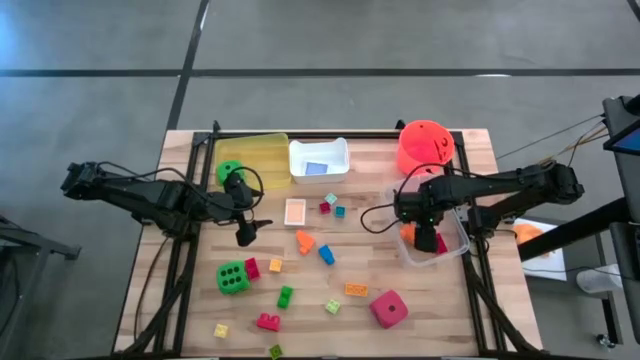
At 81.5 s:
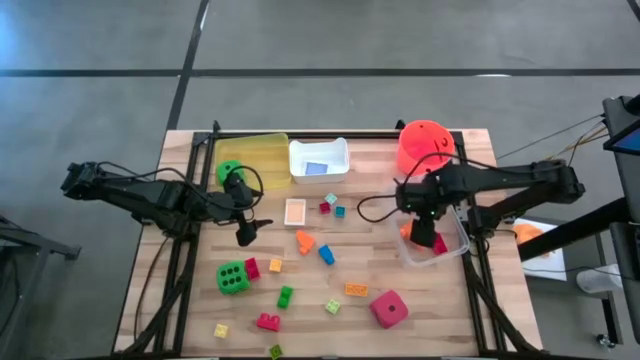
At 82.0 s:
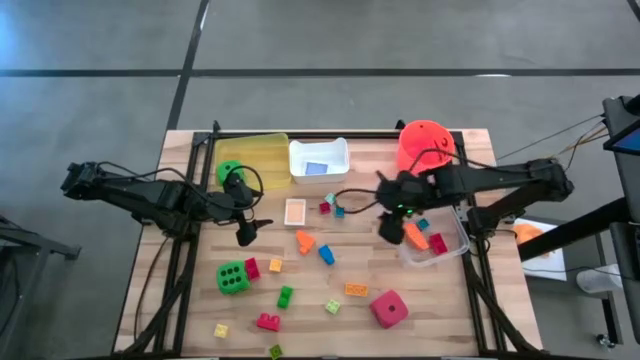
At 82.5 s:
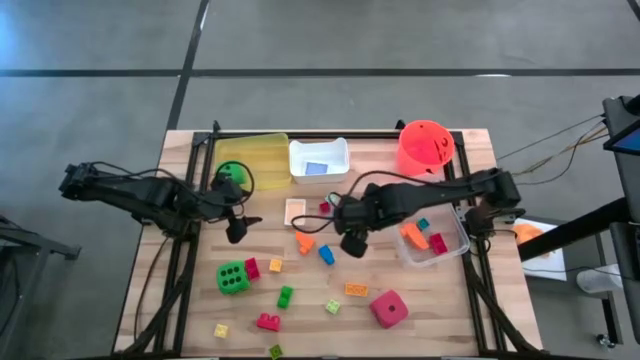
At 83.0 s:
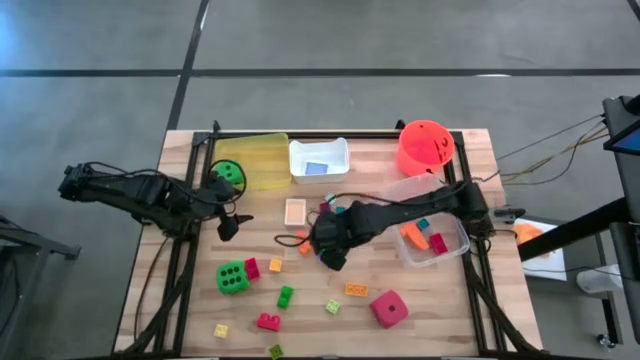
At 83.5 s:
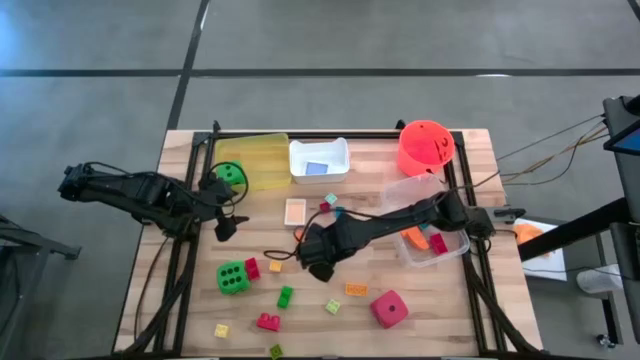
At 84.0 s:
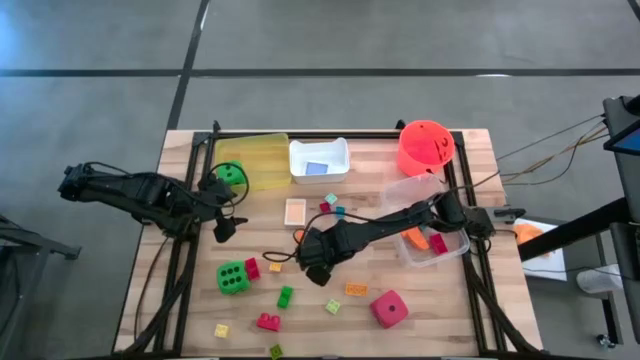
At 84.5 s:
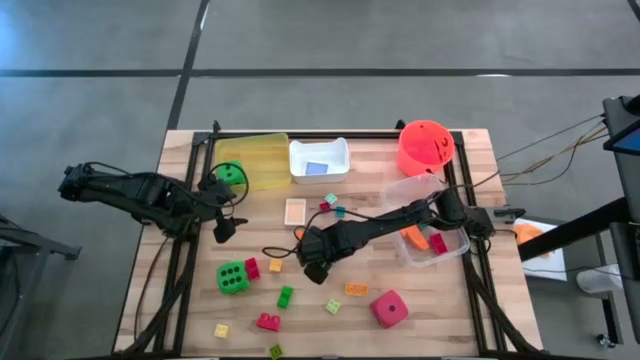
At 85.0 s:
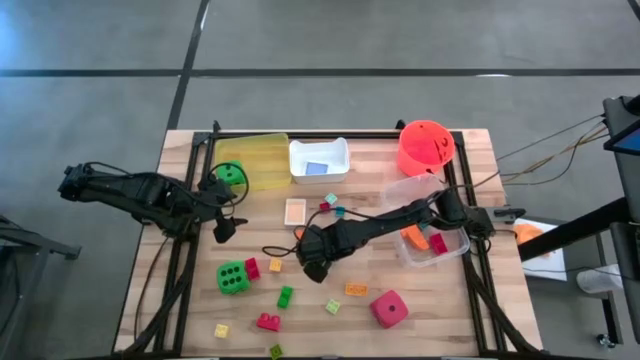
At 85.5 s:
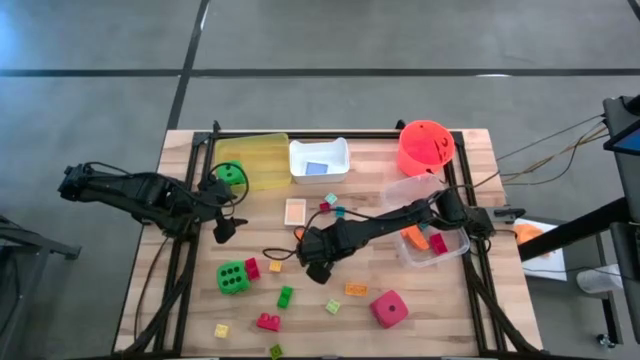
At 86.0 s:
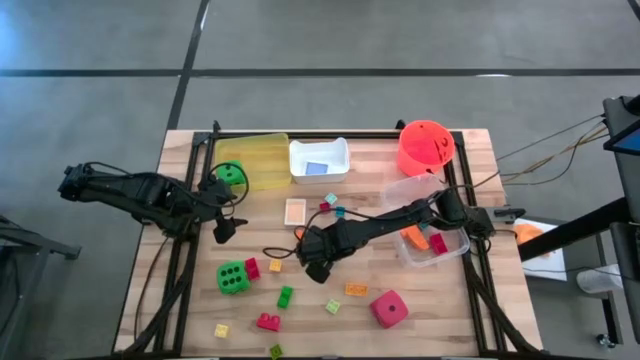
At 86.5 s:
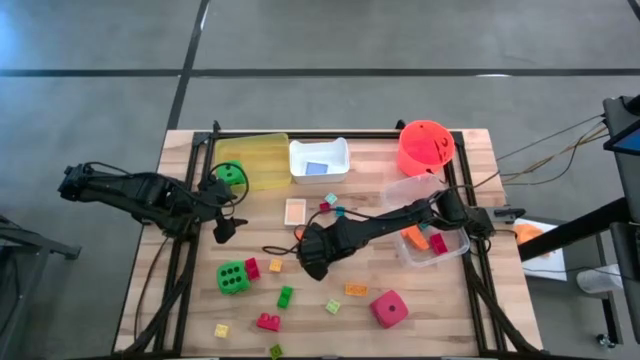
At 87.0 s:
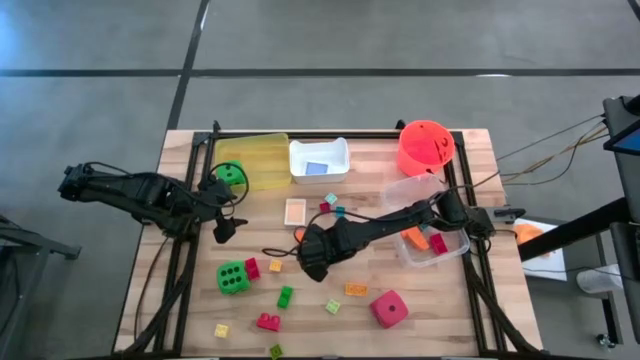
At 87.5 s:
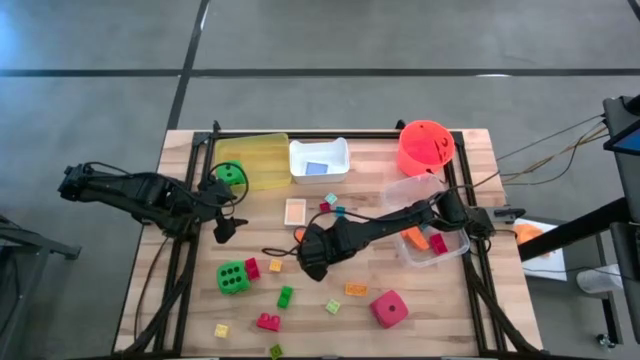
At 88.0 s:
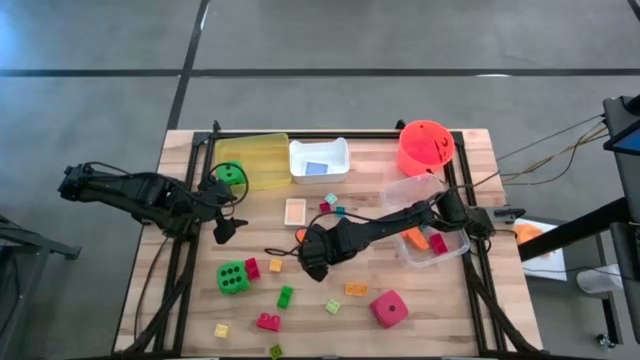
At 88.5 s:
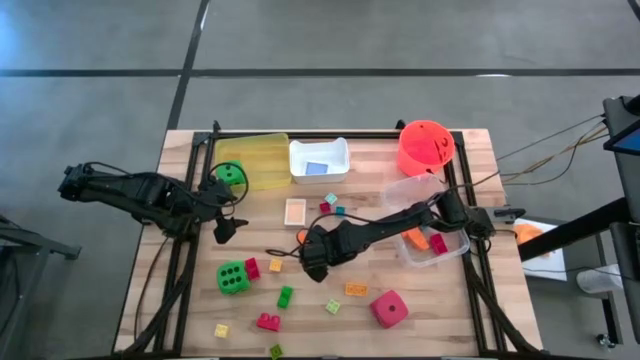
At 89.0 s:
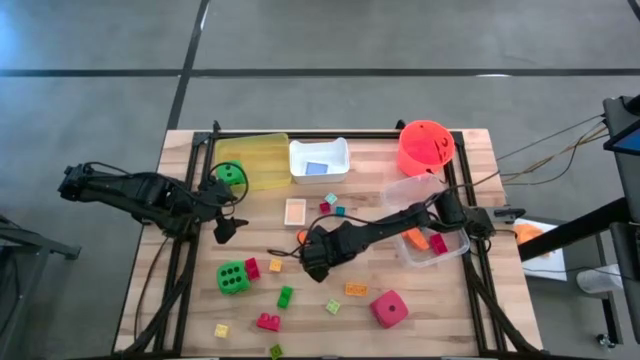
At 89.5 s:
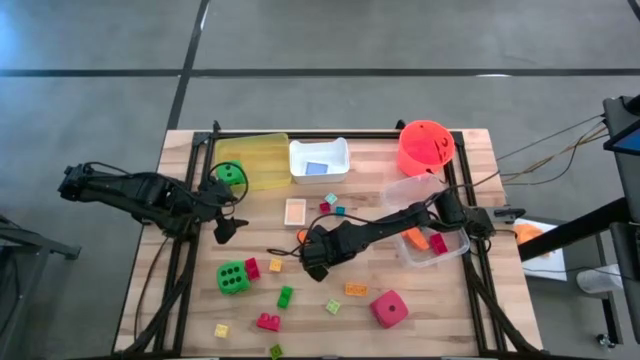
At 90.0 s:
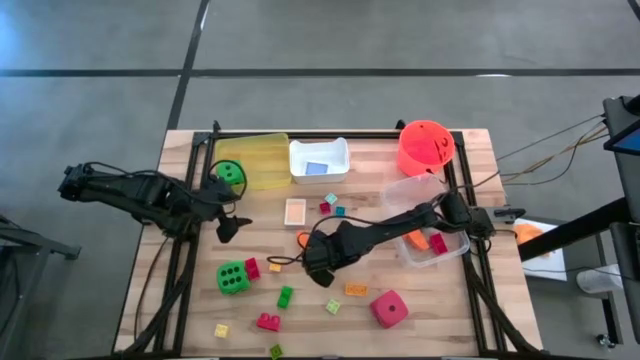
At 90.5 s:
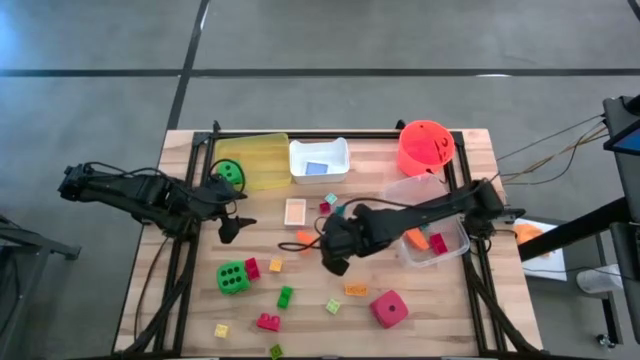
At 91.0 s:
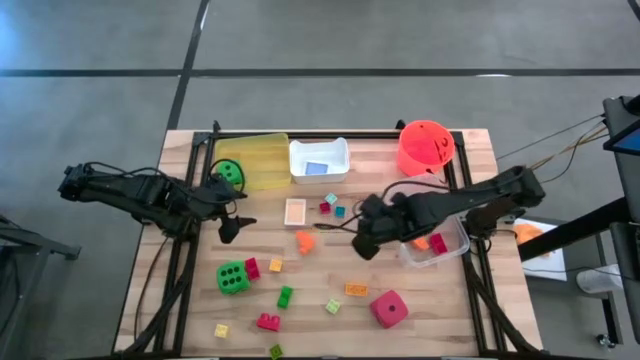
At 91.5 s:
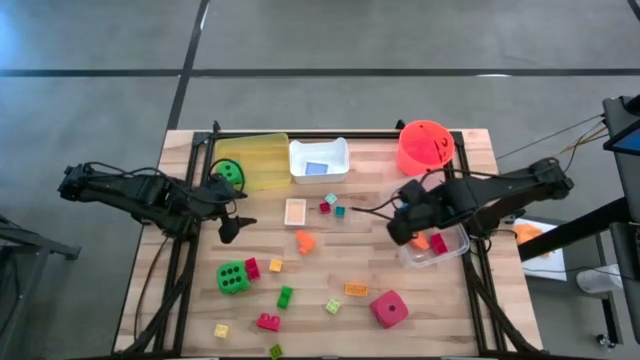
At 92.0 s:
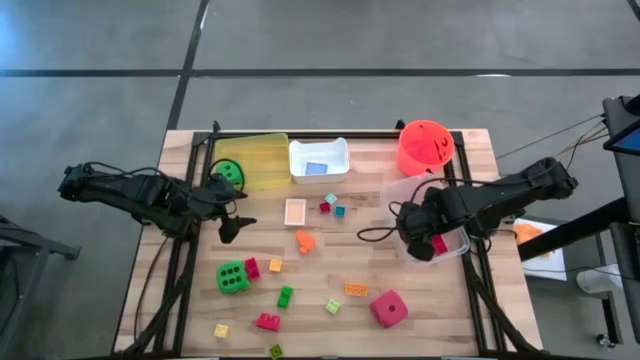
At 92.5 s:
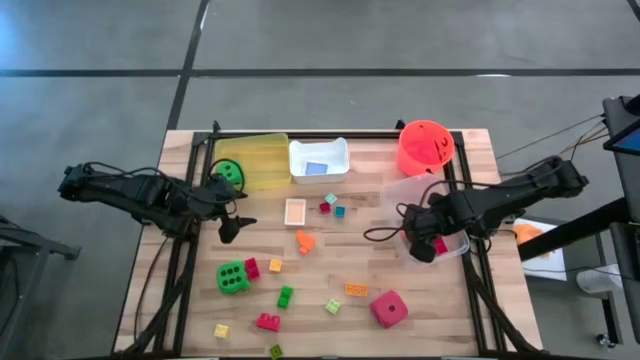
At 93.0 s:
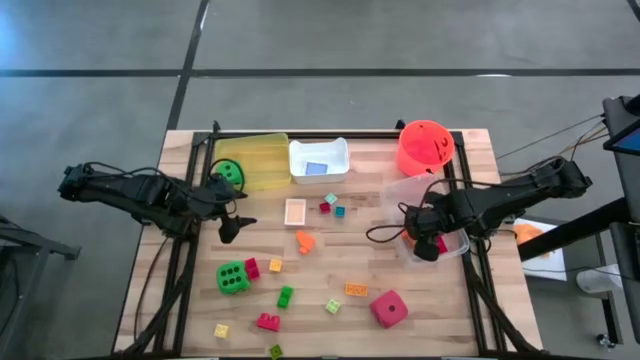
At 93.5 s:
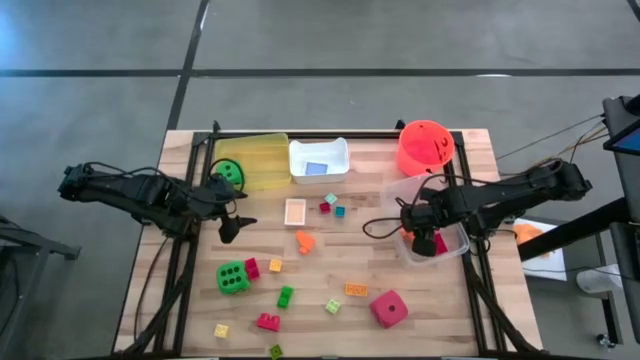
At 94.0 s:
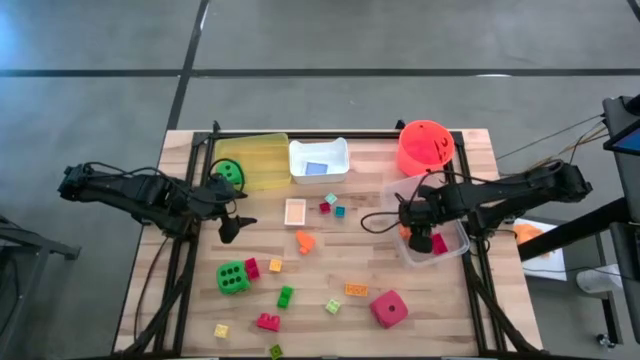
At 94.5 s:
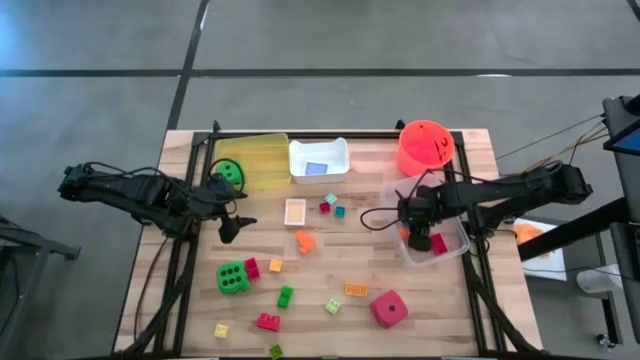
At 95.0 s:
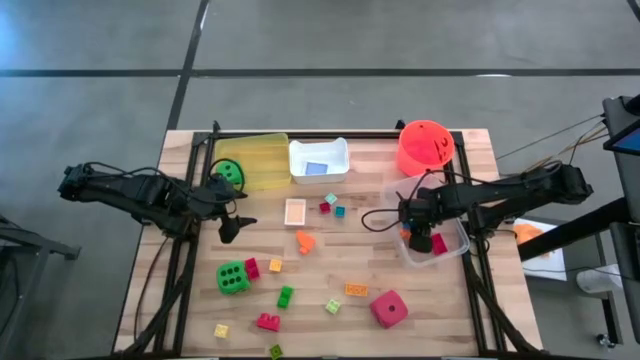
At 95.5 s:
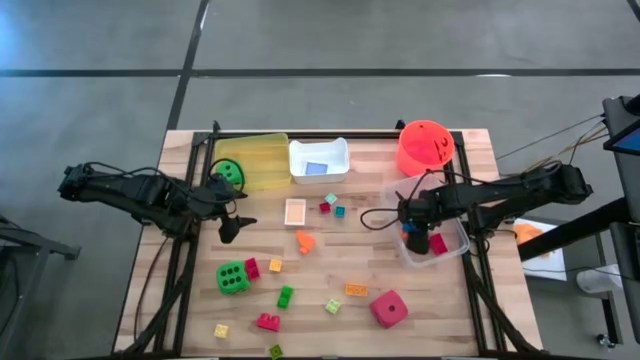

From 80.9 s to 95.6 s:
Task: Pick & Place Toys
Put the dark blue game piece into the transparent bin

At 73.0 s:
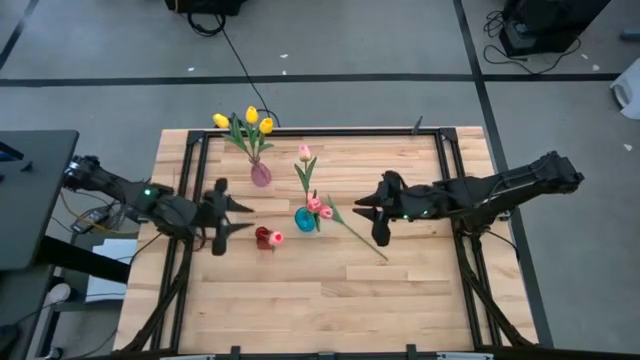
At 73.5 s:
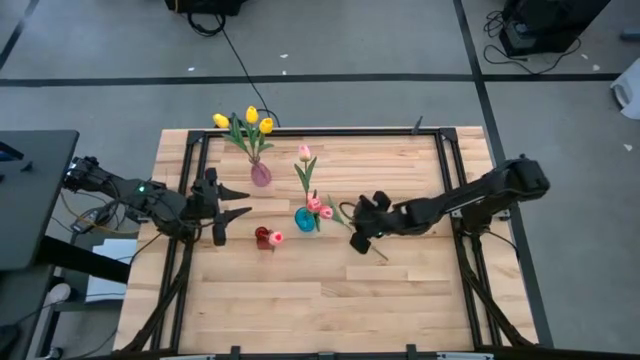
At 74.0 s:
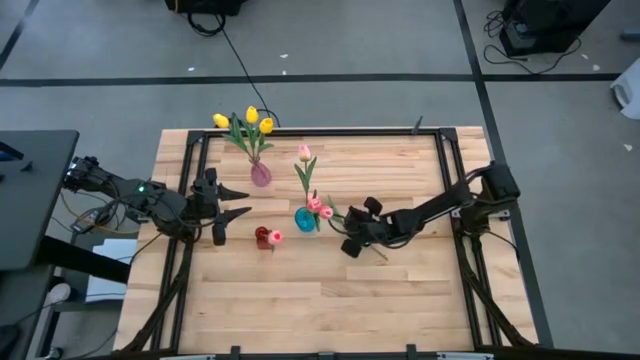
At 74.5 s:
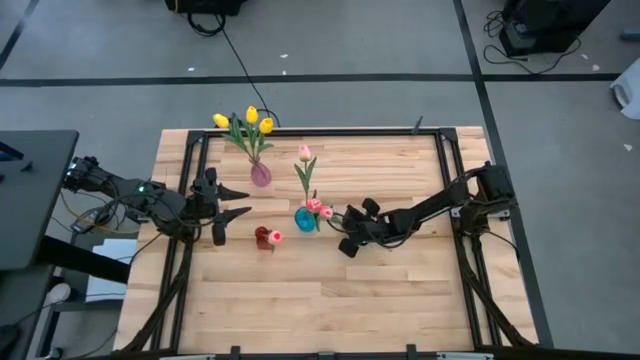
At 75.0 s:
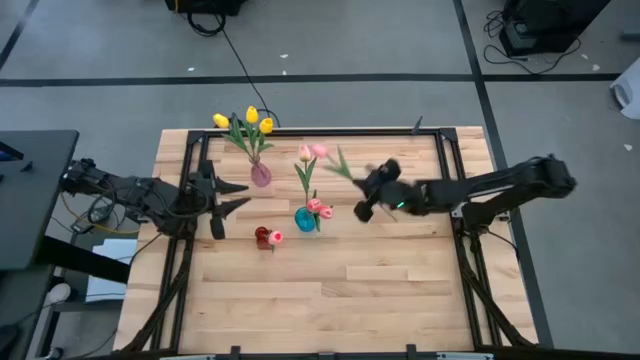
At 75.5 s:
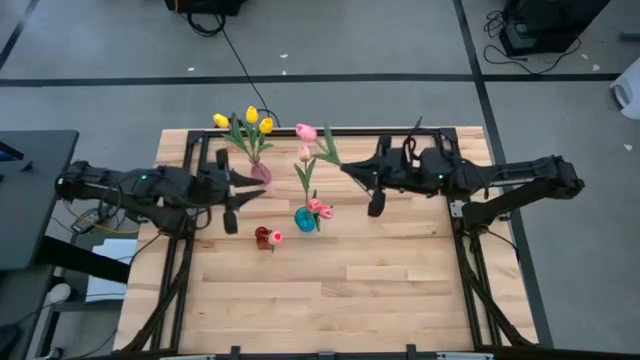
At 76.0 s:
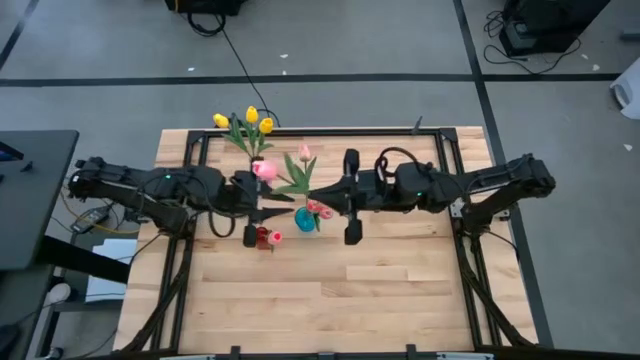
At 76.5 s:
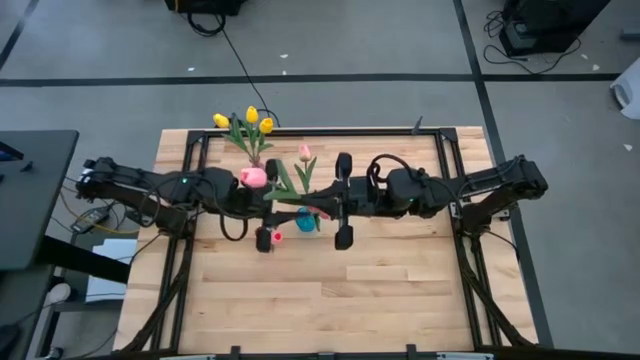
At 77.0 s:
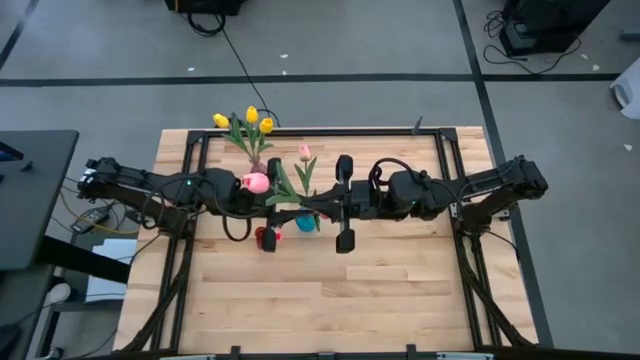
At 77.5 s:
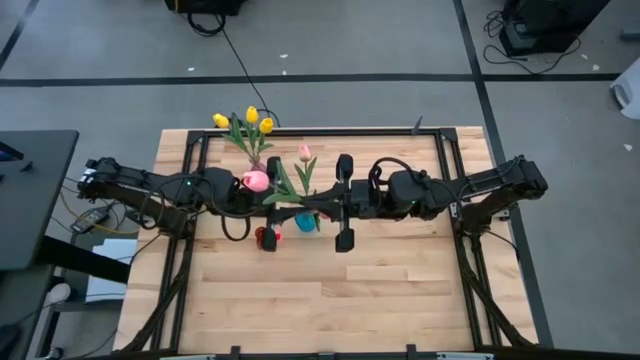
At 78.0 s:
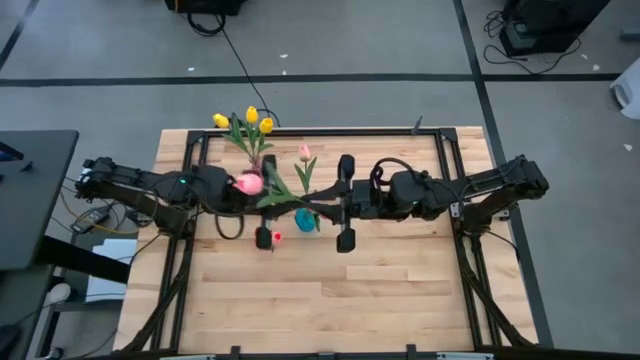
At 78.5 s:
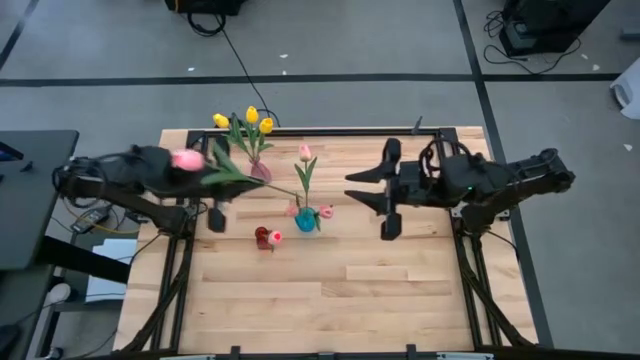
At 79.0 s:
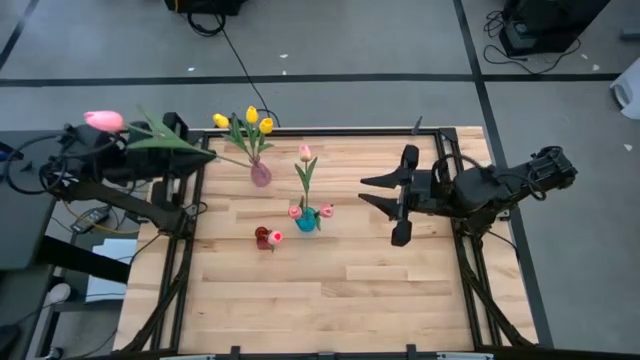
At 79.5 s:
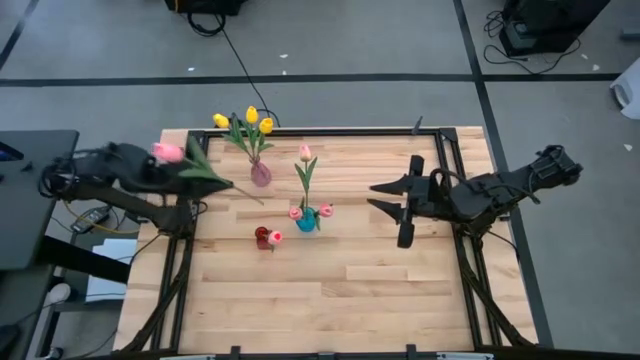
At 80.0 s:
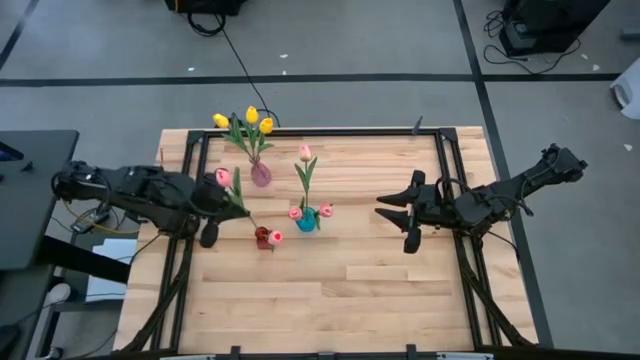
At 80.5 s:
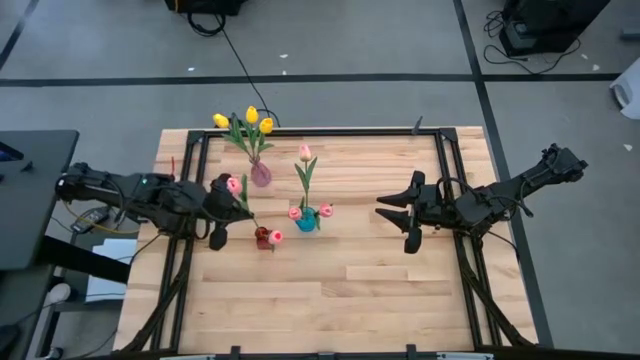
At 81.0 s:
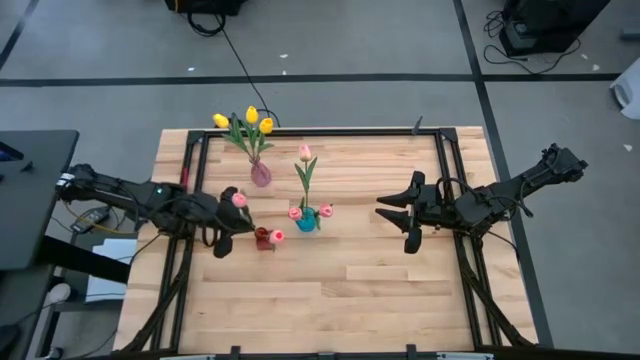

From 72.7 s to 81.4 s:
Task: Sort flowers into vase by color
Put the pink flower into the red flower vase
